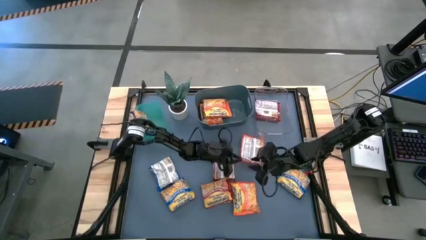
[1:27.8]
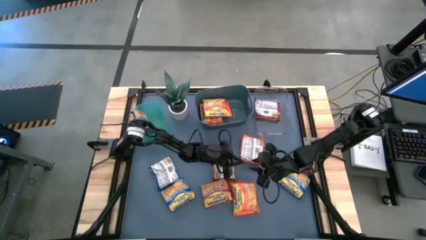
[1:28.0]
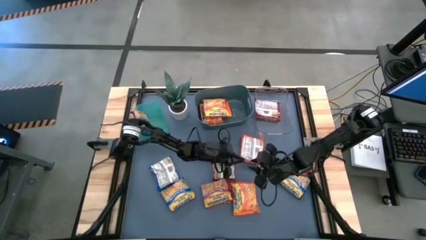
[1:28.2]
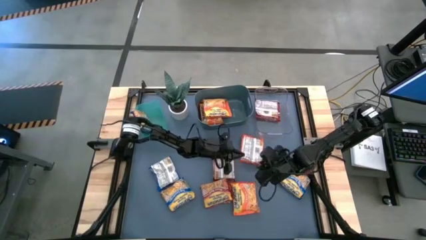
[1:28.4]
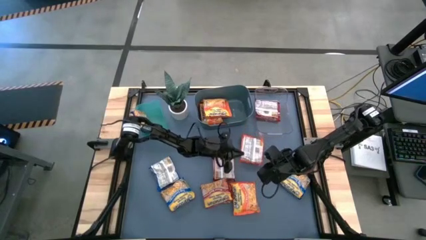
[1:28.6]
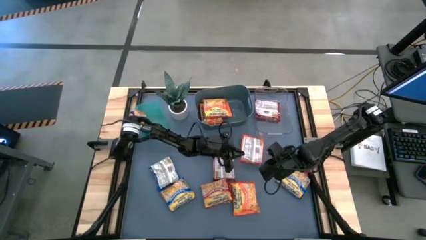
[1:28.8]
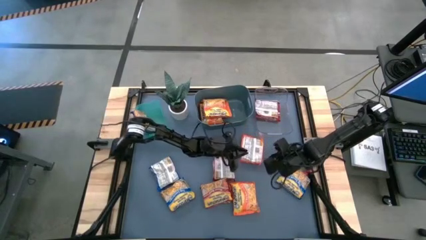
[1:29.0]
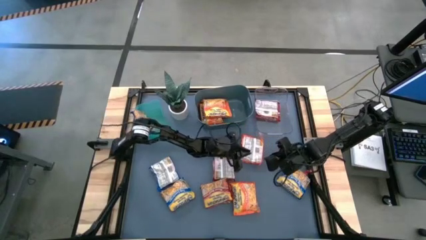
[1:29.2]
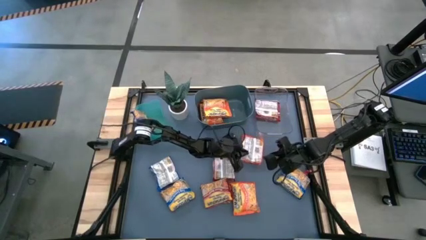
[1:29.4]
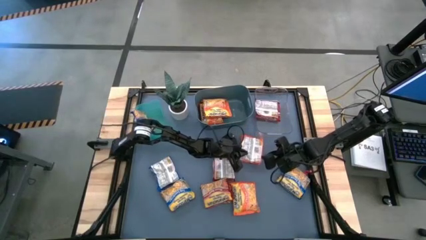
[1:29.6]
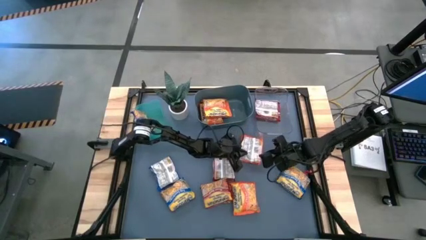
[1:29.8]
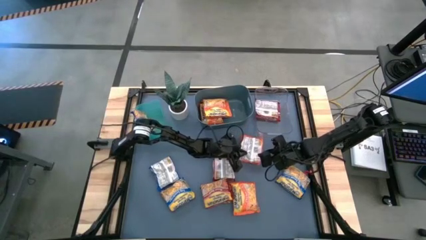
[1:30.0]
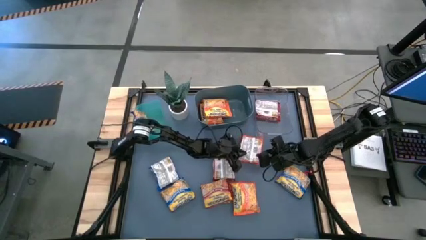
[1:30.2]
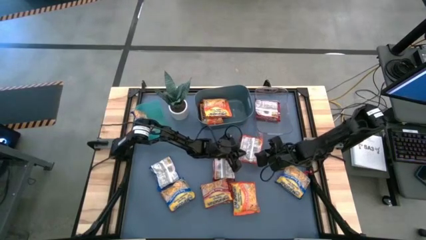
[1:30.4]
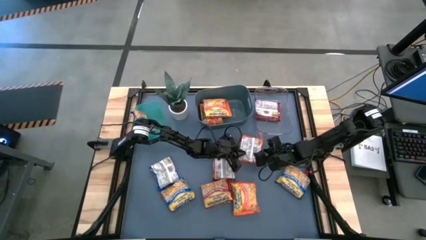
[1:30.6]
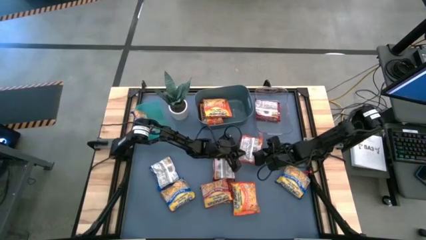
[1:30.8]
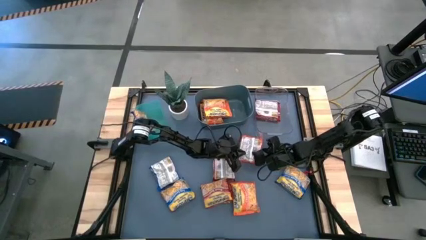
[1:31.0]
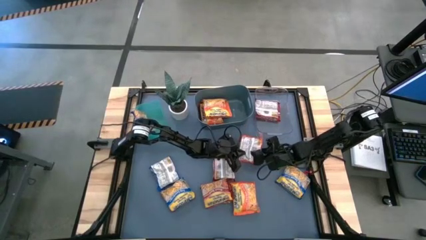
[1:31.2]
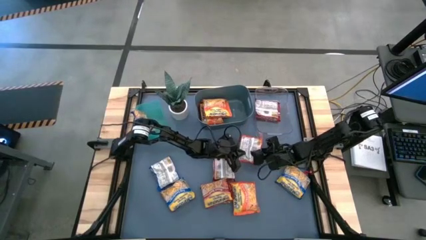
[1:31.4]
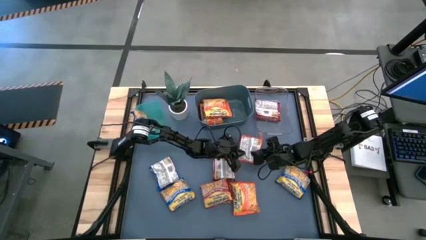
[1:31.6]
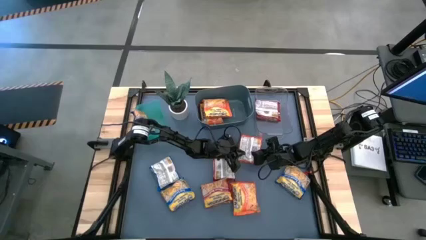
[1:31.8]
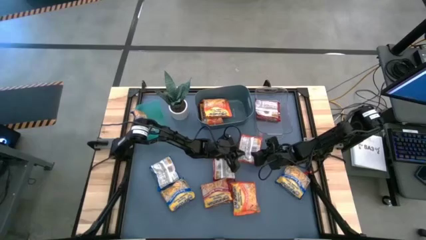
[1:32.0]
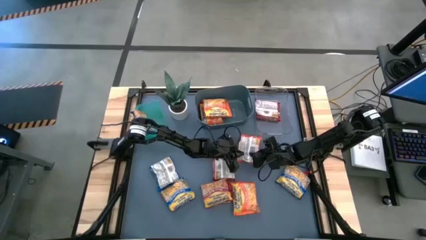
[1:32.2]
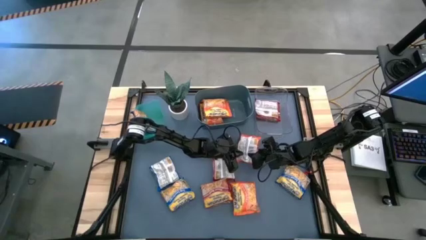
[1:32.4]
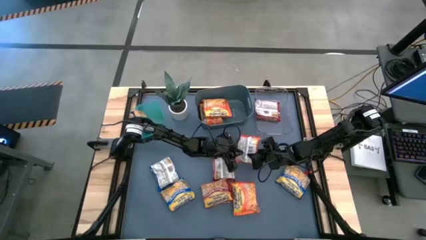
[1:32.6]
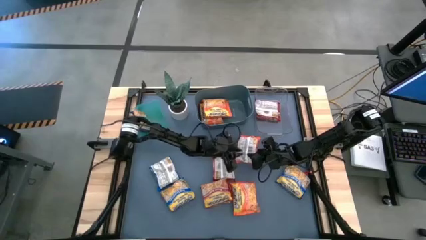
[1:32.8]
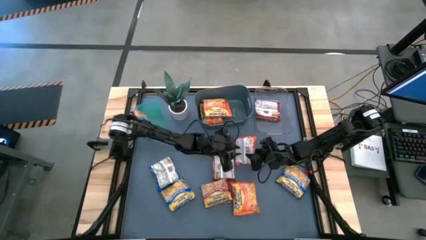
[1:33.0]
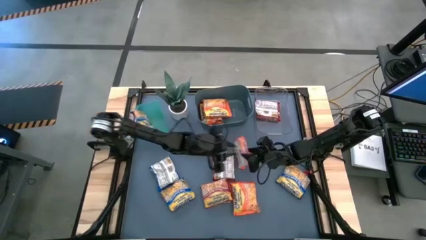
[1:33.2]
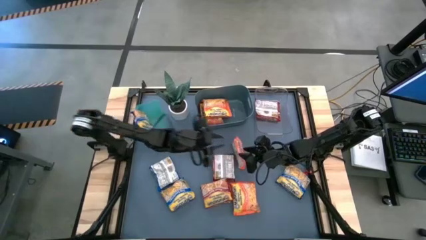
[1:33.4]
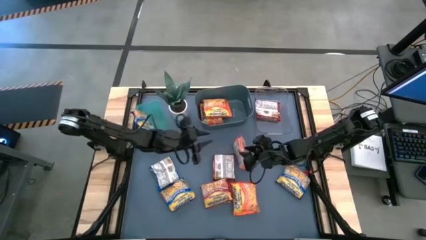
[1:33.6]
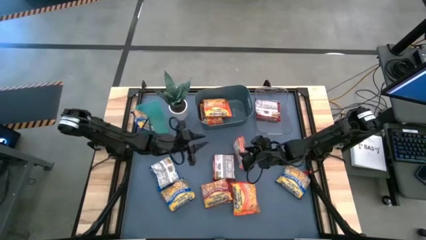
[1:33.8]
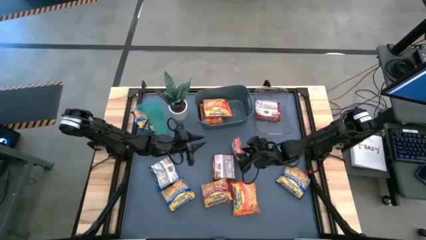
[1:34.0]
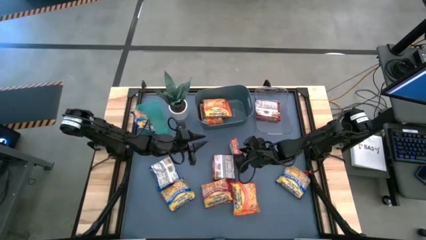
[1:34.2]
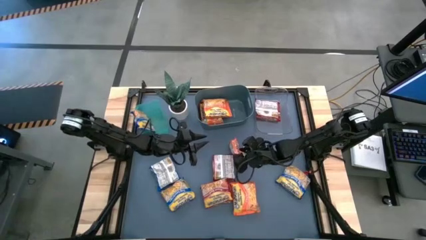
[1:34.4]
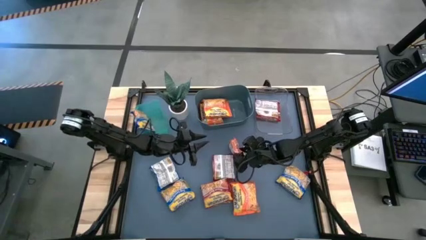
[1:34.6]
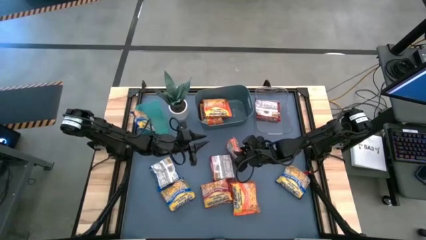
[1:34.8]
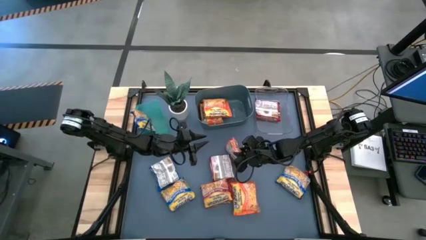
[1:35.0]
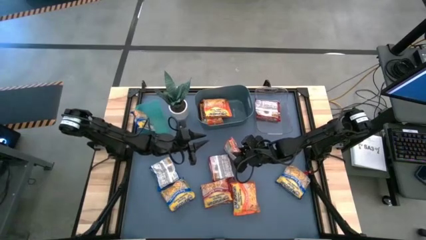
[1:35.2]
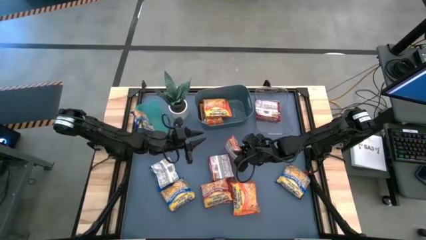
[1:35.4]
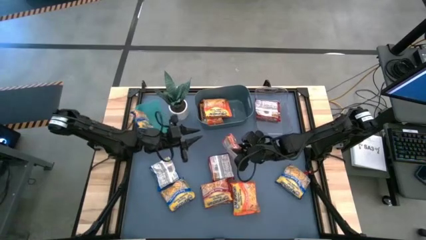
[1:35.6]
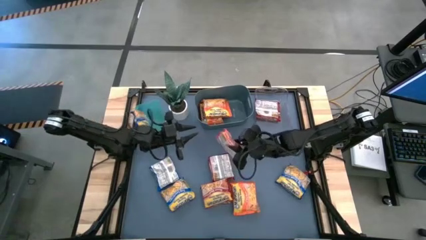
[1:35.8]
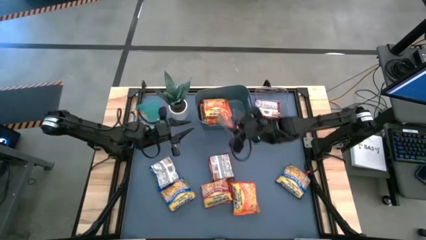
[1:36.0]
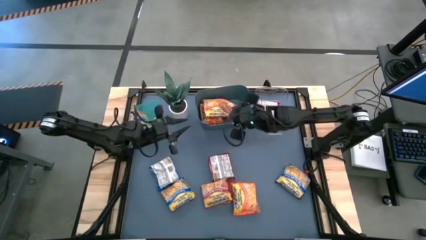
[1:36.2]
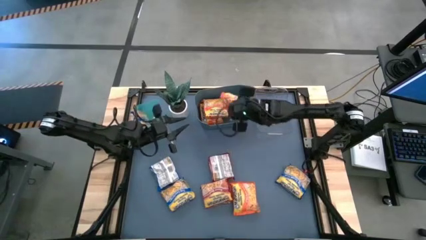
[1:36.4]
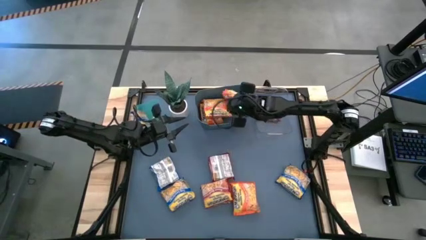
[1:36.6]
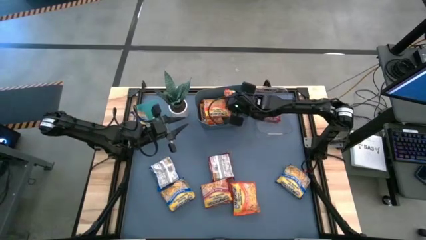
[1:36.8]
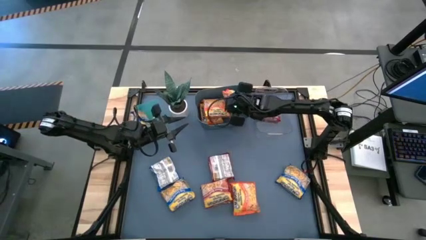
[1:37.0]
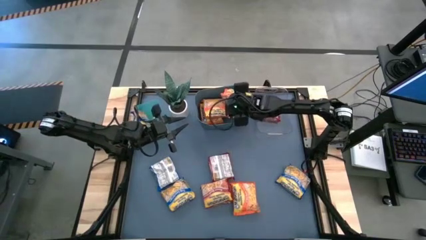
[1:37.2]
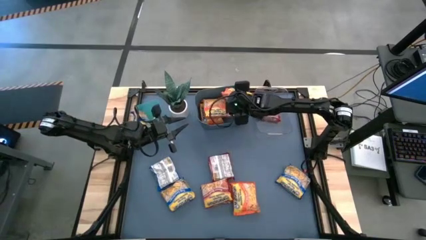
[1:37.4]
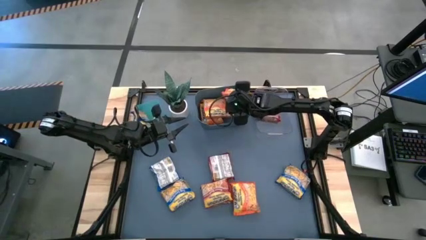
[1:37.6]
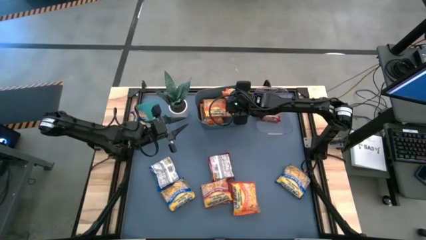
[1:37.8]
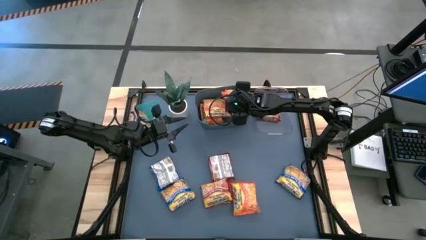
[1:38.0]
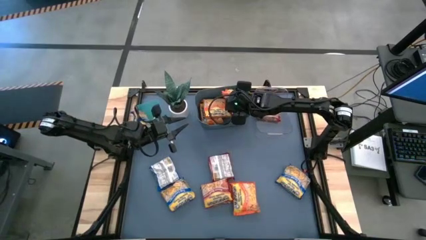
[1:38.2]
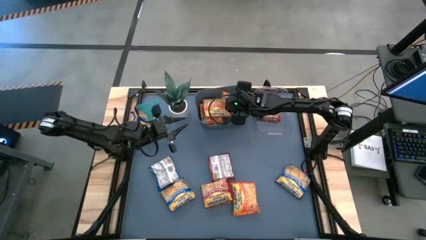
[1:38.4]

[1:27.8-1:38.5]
Task: Sort Maruchan noodles
Put the orange noodle pack into the blue bin

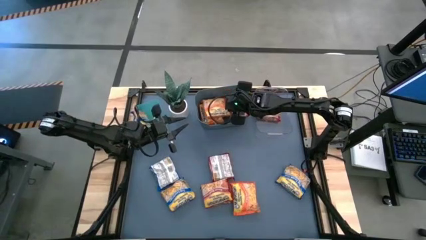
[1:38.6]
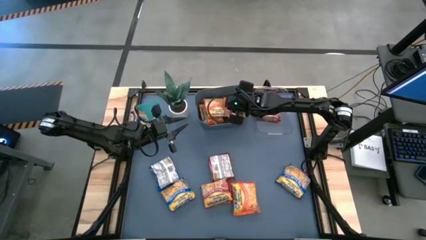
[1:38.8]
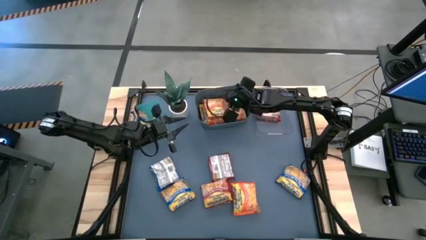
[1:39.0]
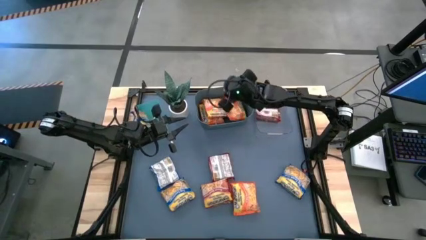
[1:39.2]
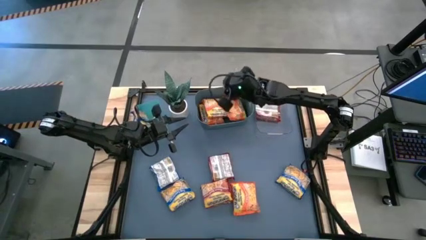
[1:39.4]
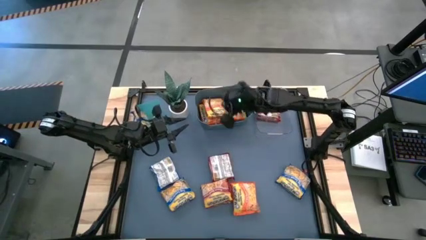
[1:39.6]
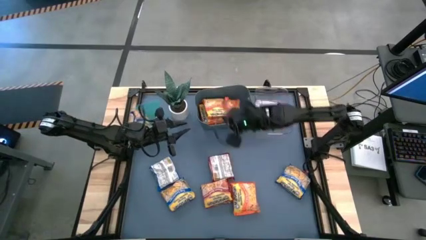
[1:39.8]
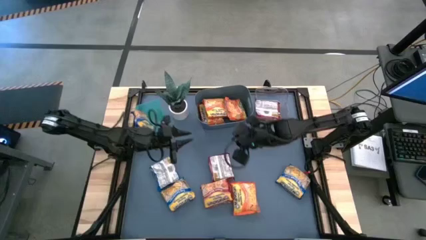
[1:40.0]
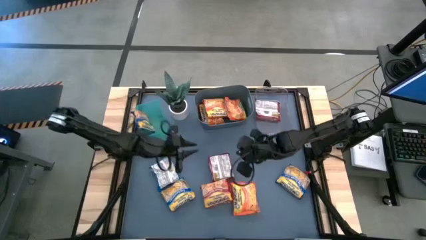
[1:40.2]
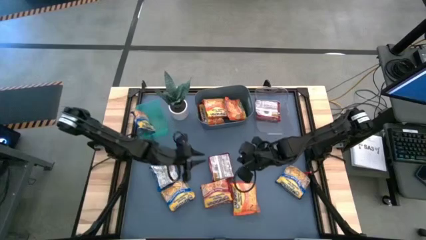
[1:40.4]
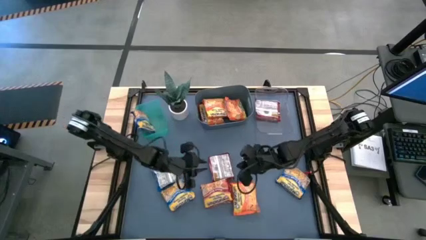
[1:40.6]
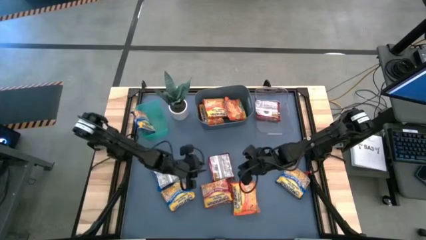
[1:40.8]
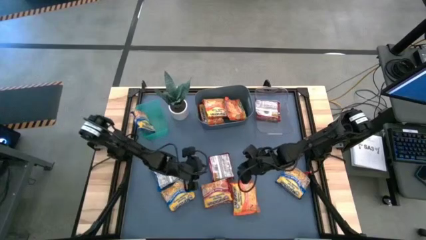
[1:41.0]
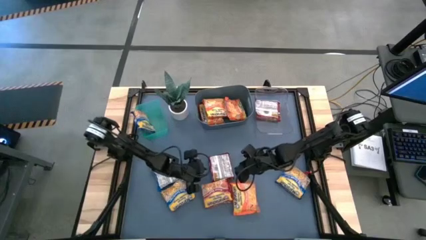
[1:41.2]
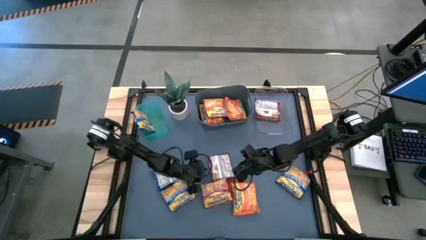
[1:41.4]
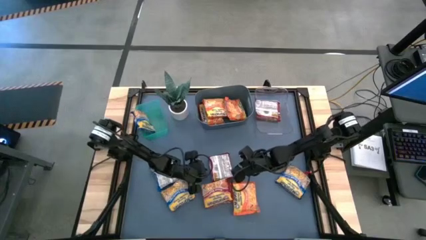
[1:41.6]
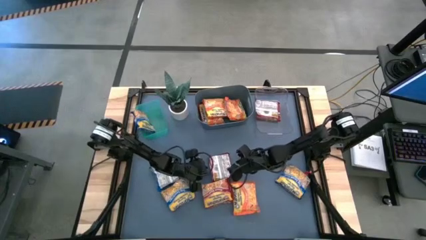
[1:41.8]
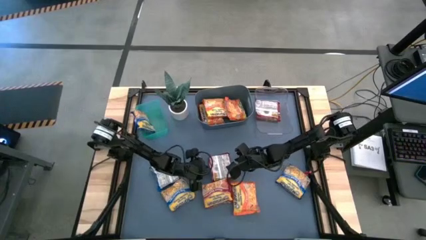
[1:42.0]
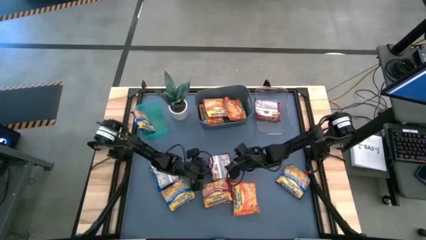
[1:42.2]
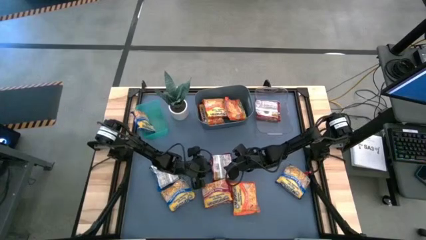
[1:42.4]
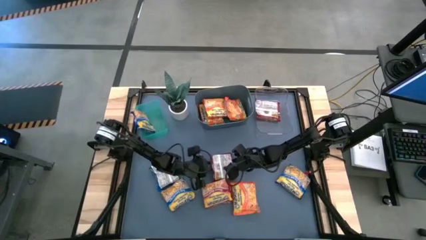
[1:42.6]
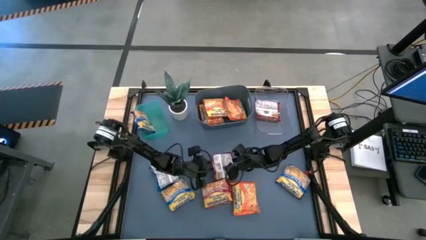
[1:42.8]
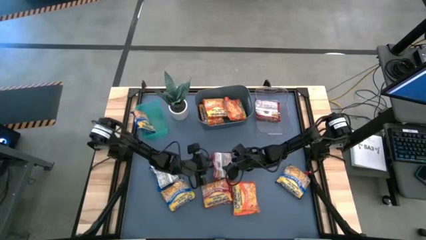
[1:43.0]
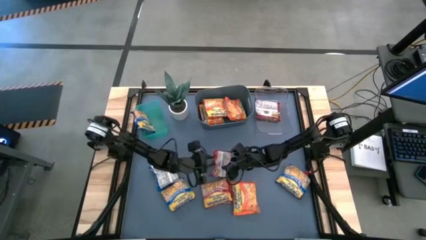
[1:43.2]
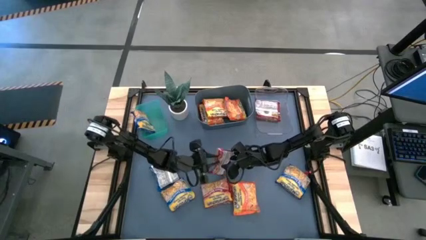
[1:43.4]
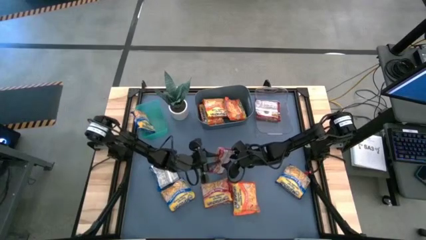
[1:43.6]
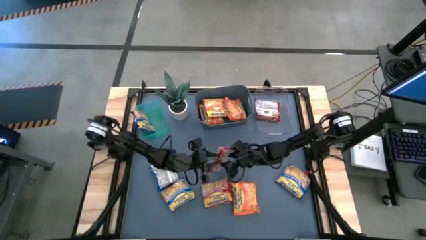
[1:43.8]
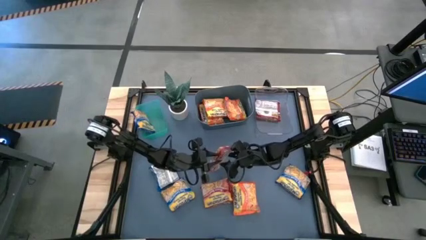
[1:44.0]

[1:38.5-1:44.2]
Put the red noodle pack into the transparent bin
